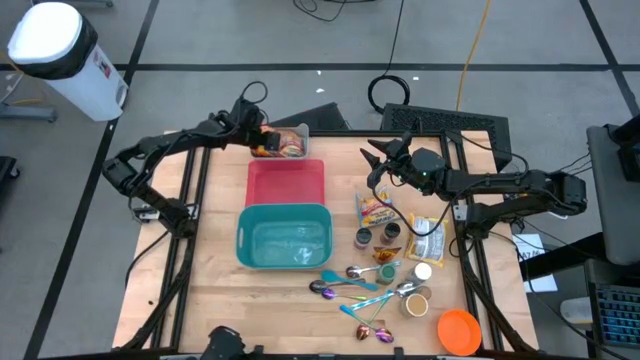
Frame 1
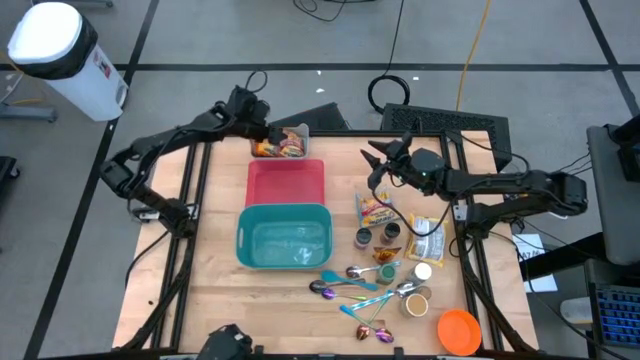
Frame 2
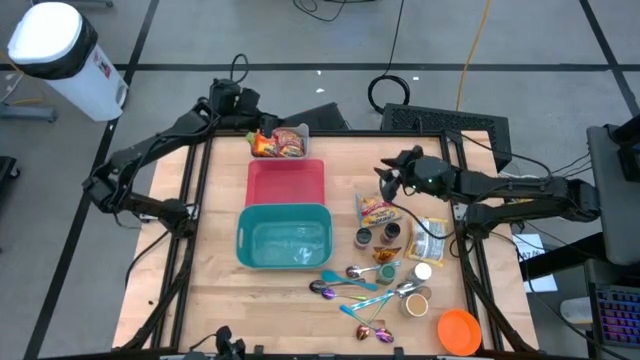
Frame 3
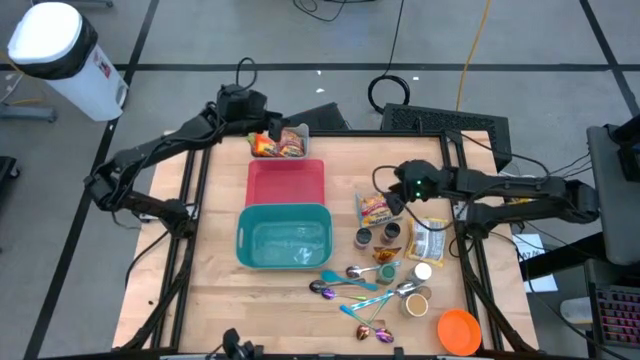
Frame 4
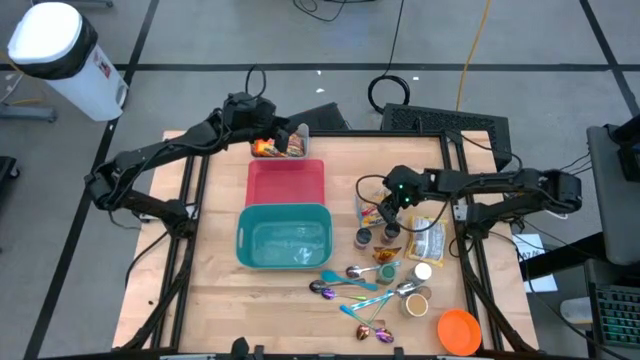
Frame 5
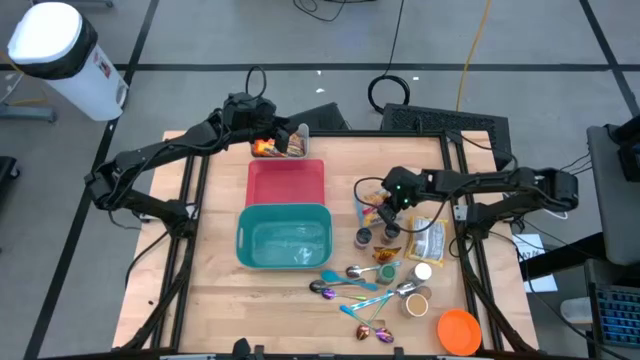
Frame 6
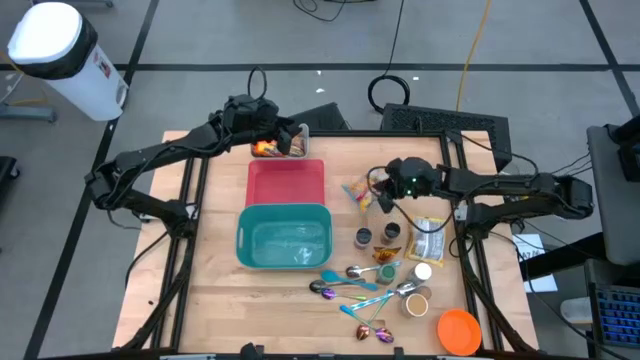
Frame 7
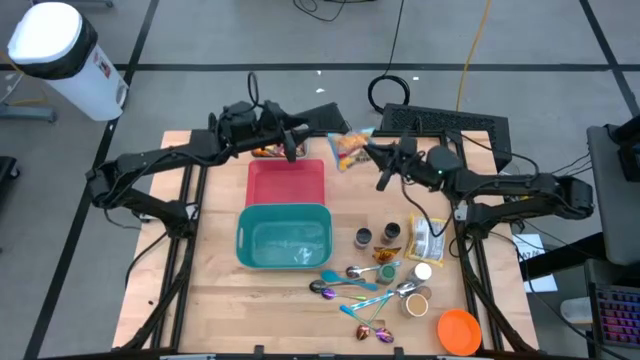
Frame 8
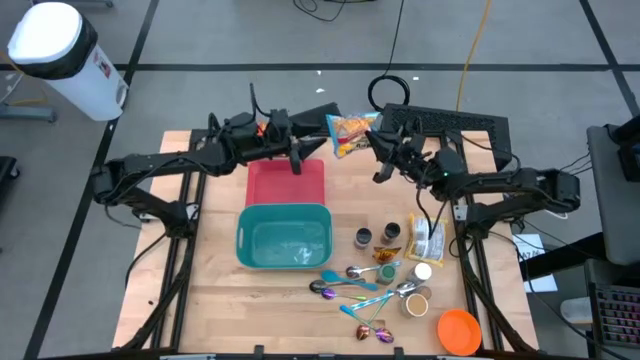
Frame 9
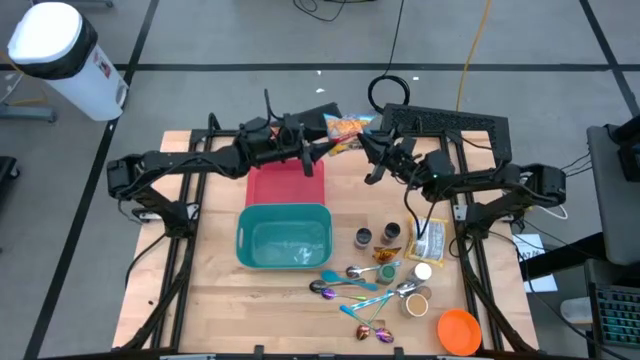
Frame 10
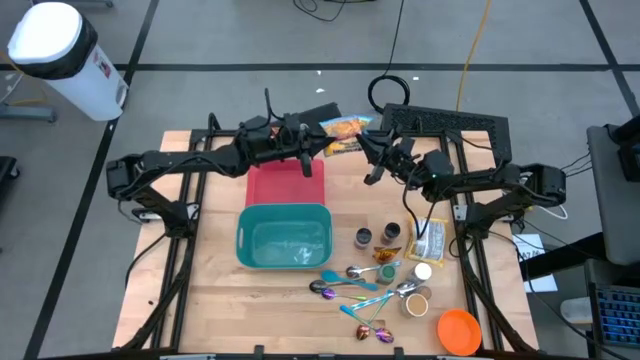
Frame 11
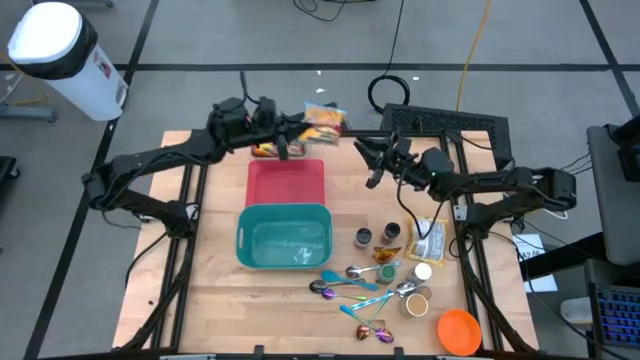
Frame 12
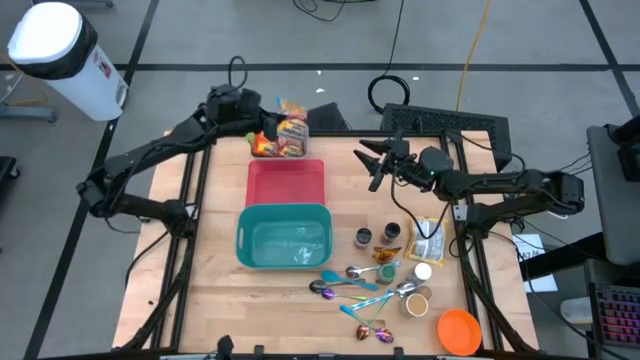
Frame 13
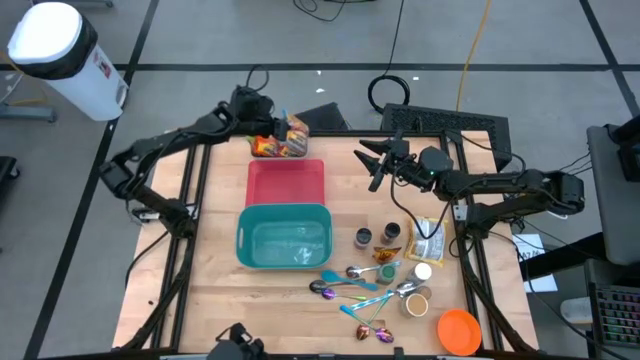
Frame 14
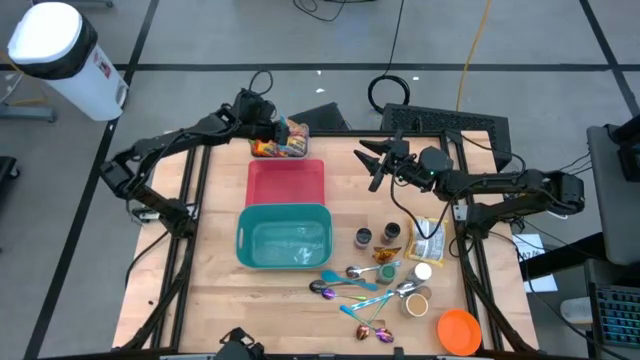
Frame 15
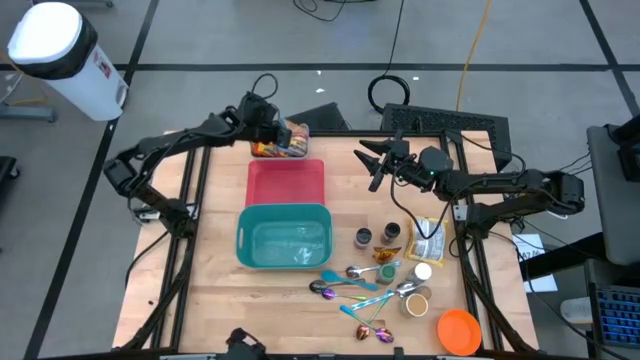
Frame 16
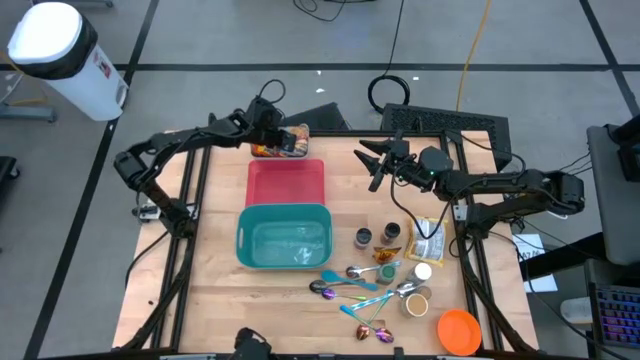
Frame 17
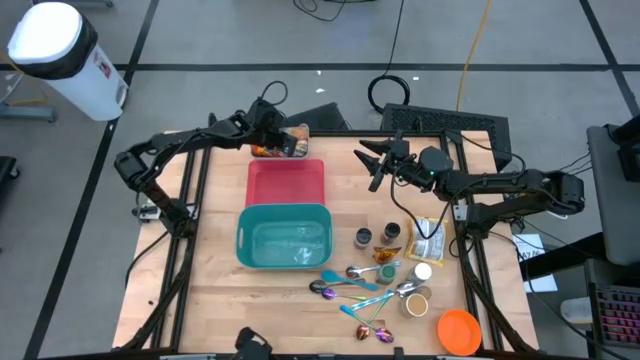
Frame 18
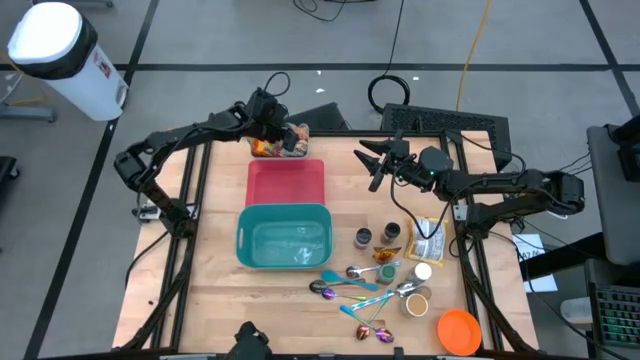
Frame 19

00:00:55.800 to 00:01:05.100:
Task: Pick & Place Food Item
Put the blue noodle pack into the gray bin

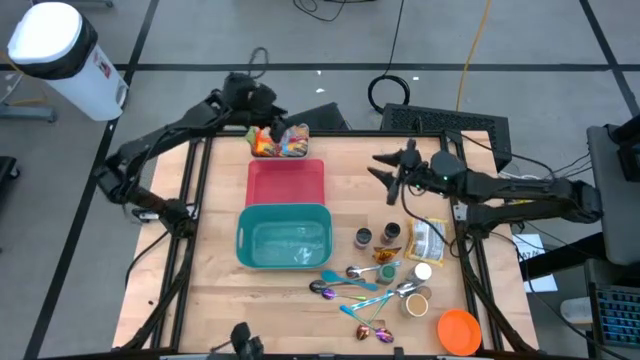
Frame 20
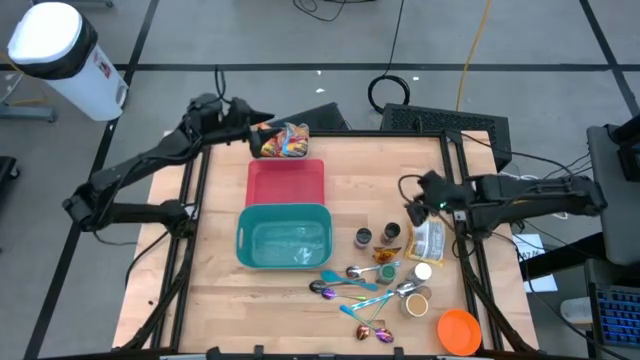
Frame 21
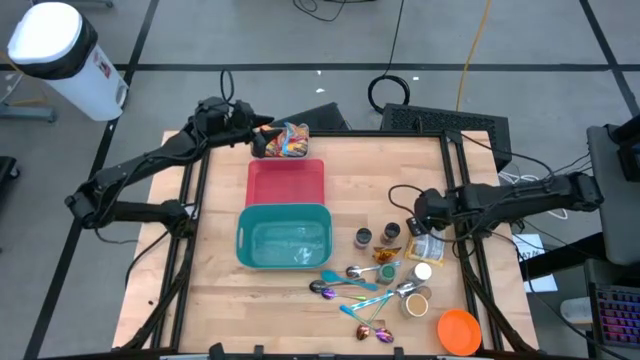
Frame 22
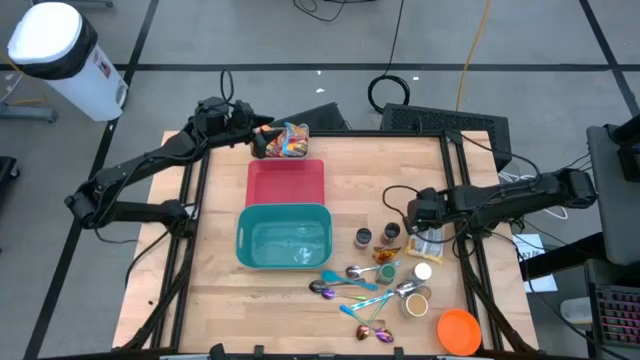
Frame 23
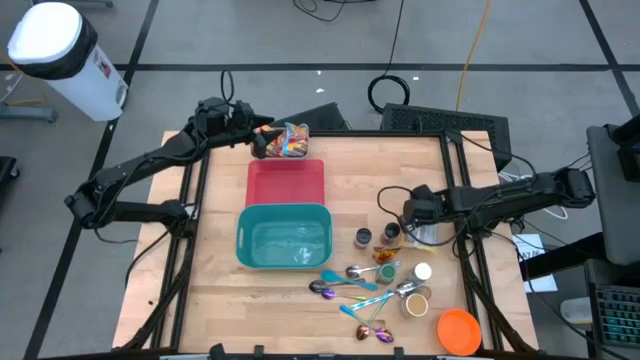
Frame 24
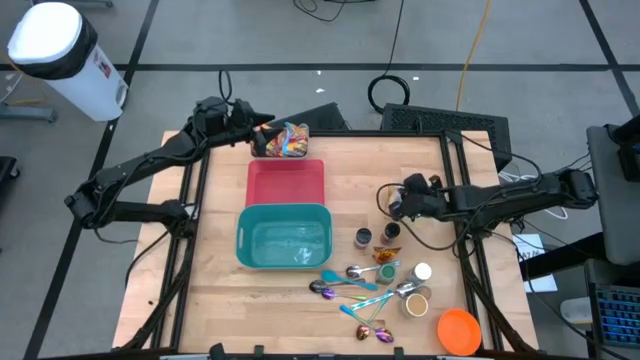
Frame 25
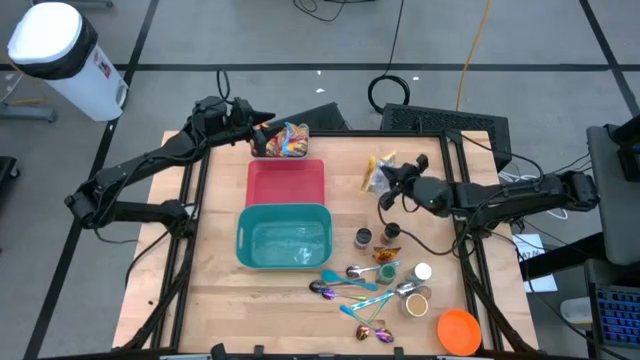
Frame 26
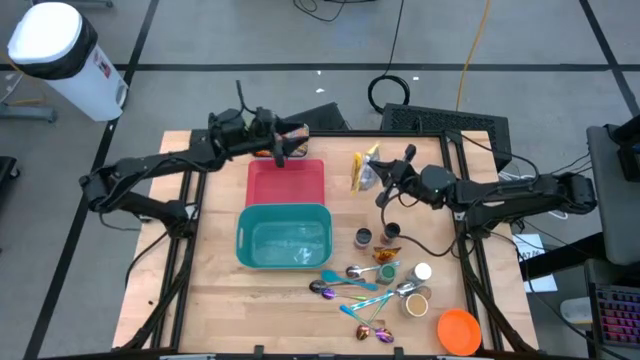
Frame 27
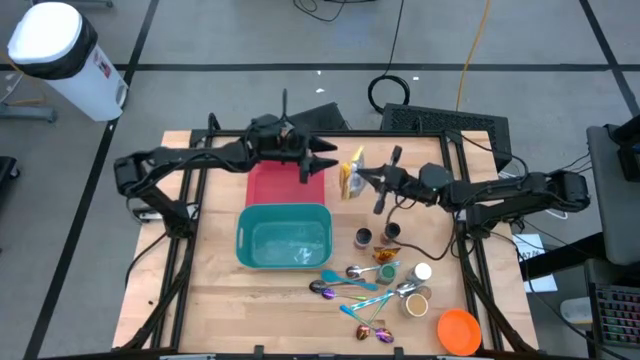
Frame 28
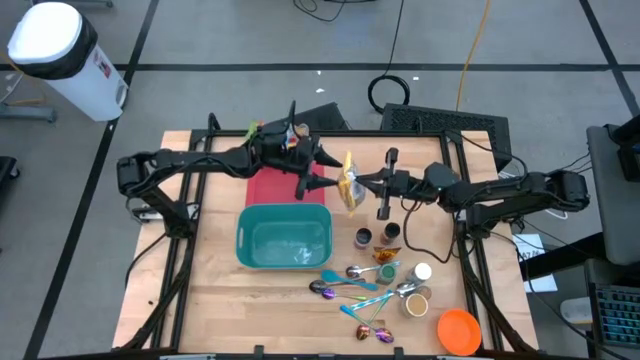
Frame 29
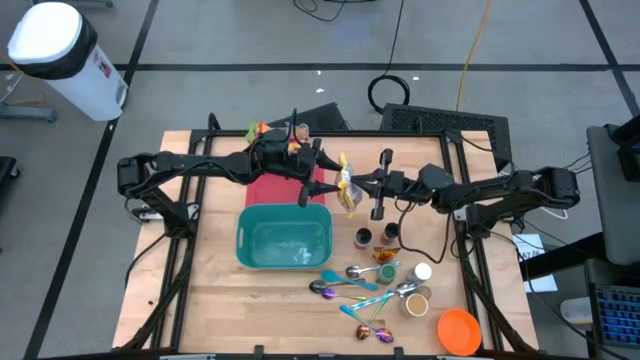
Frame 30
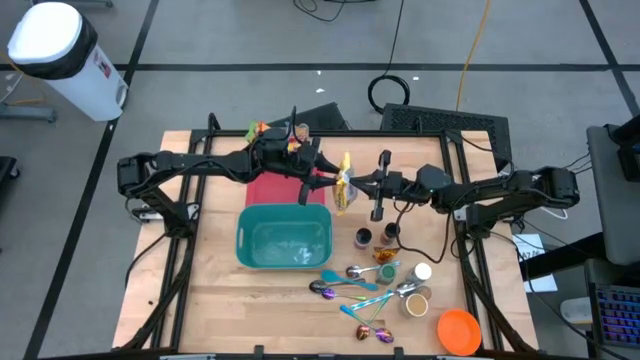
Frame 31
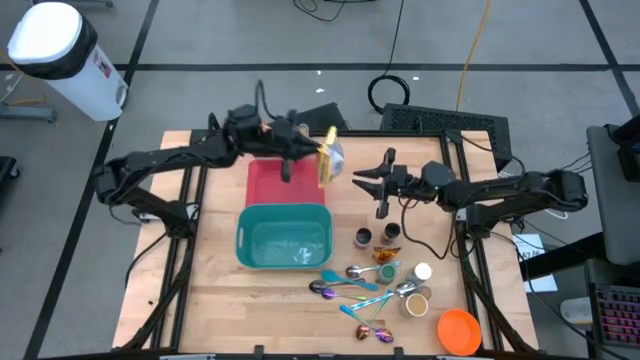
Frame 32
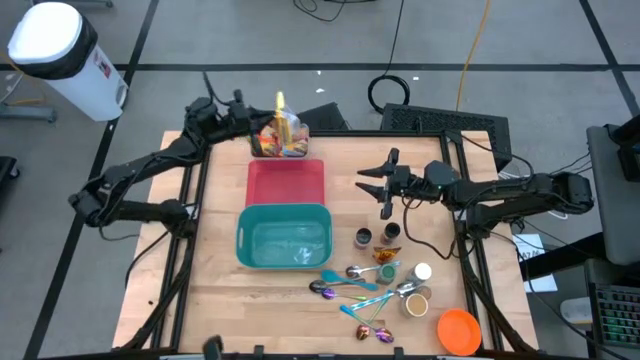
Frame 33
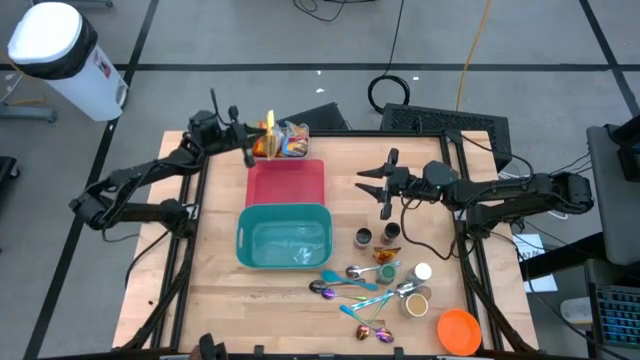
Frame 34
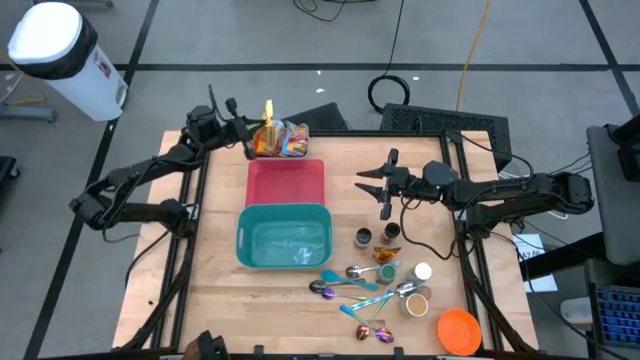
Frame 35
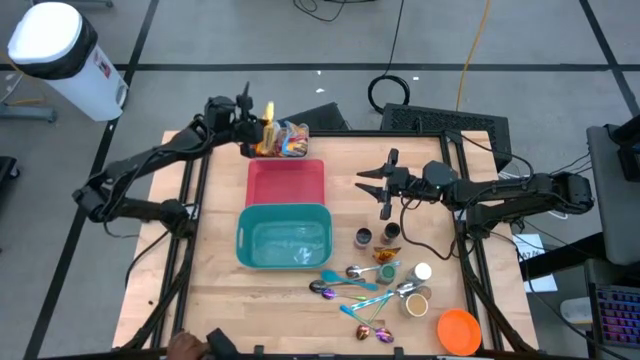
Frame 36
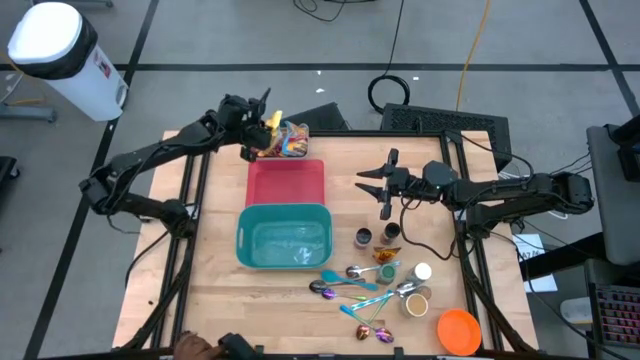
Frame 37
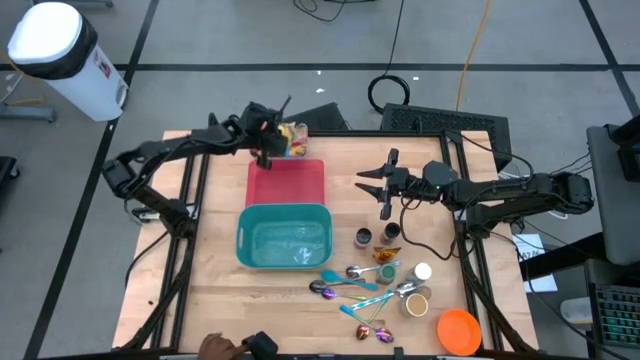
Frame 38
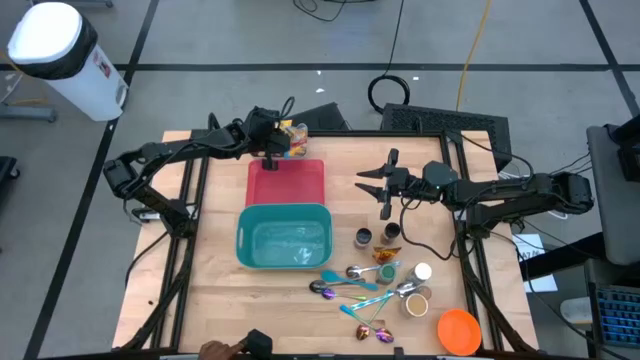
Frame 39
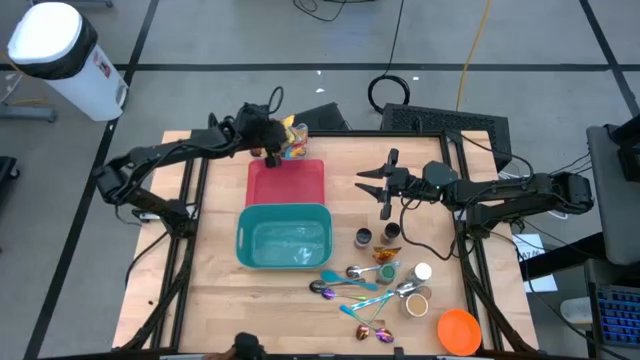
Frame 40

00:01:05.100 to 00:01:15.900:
Put the yellow noodle pack into the gray bin

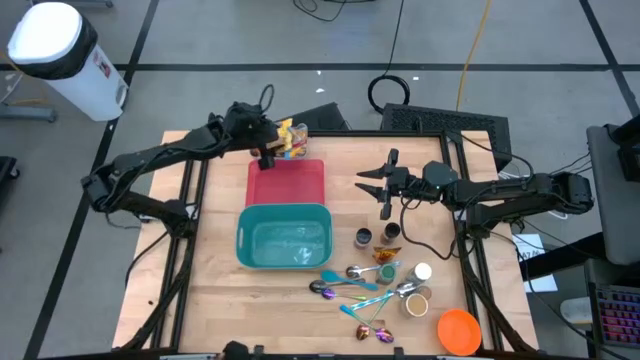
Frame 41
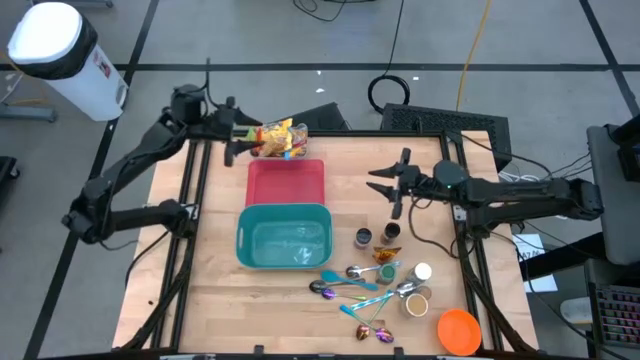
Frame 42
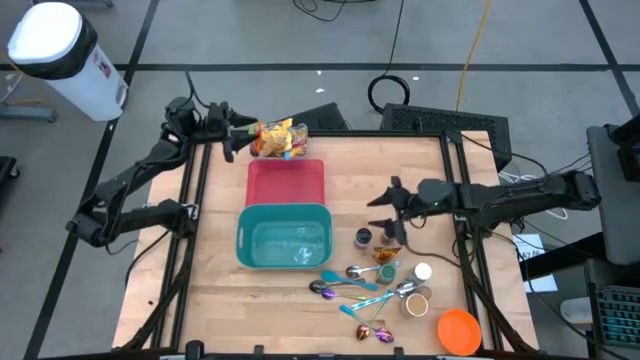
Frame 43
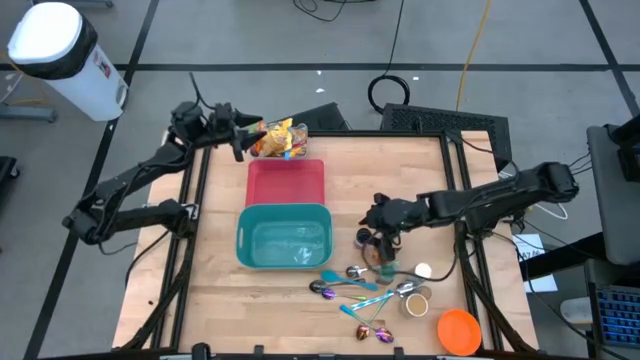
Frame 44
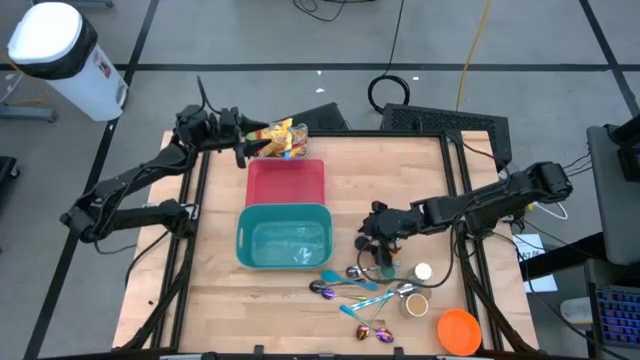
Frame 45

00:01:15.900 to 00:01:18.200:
Put the purple seasoning bottle into the red bin
